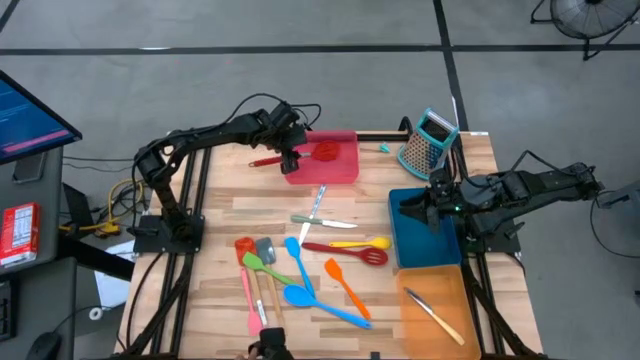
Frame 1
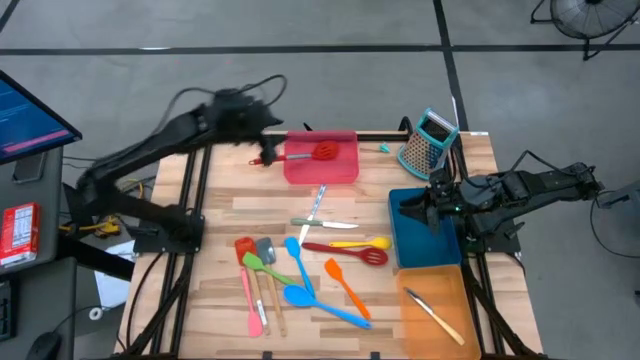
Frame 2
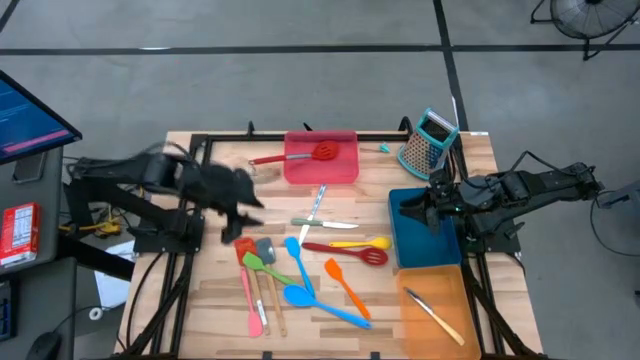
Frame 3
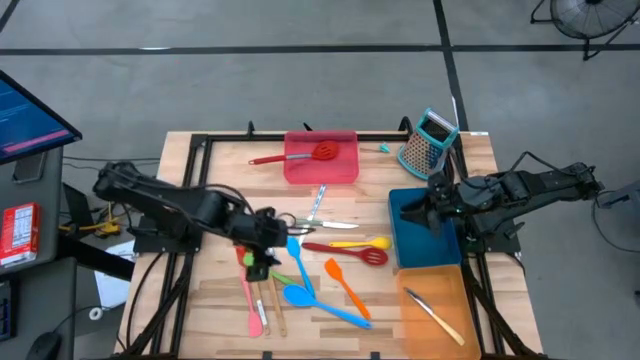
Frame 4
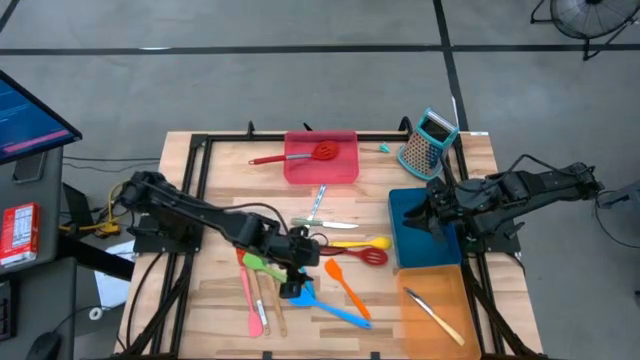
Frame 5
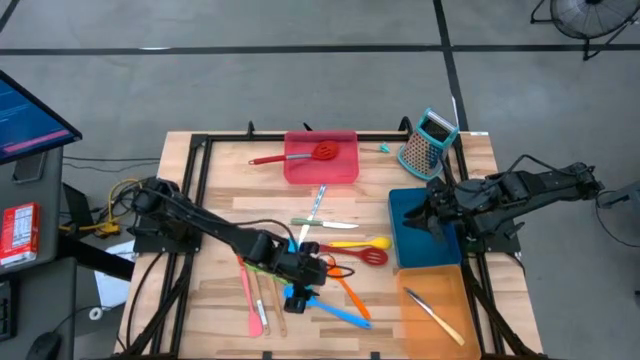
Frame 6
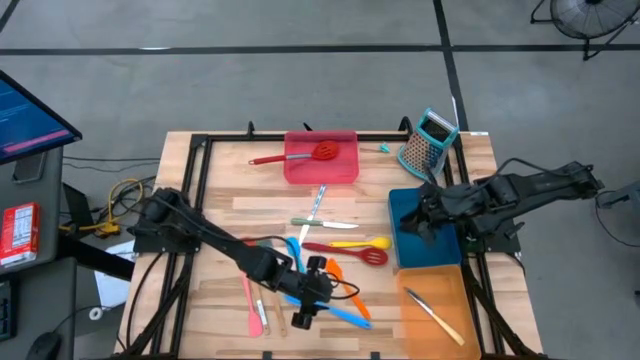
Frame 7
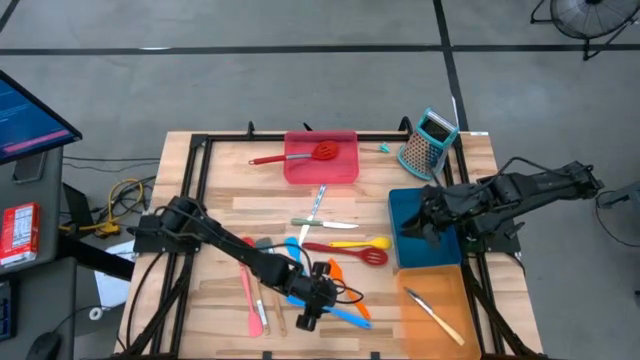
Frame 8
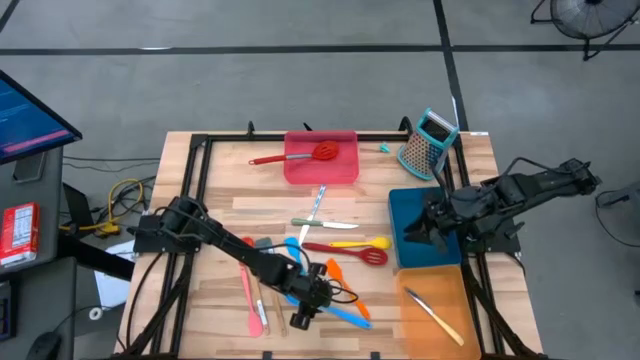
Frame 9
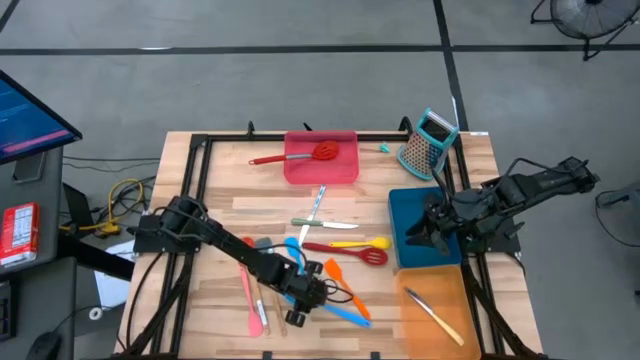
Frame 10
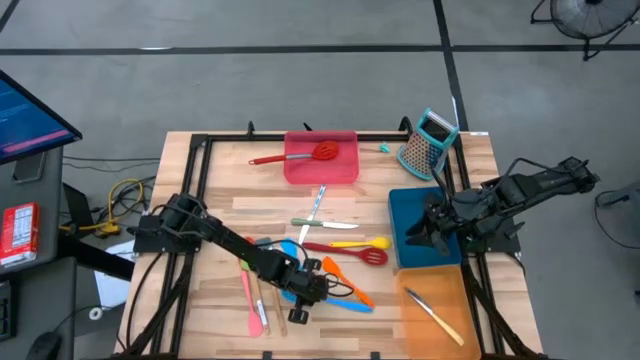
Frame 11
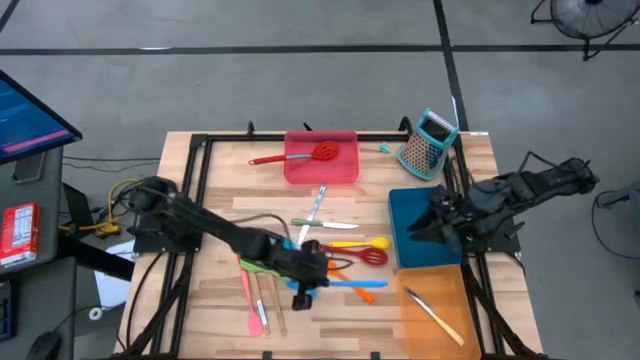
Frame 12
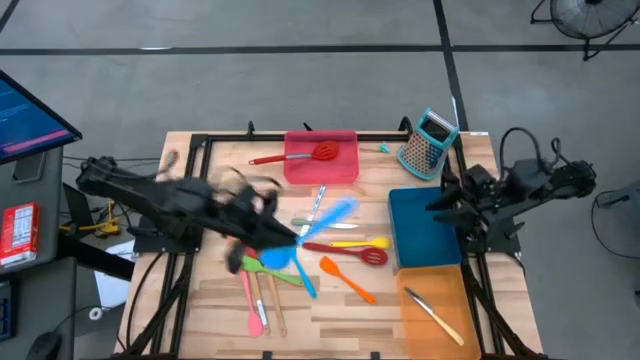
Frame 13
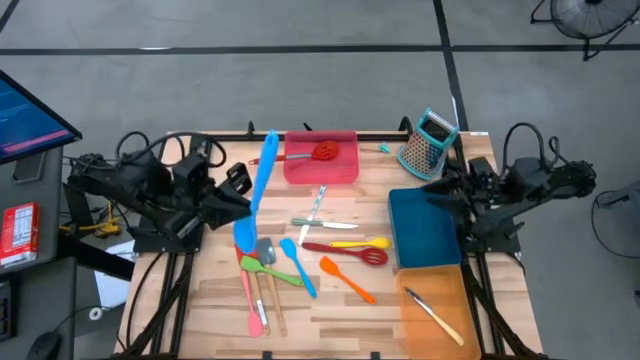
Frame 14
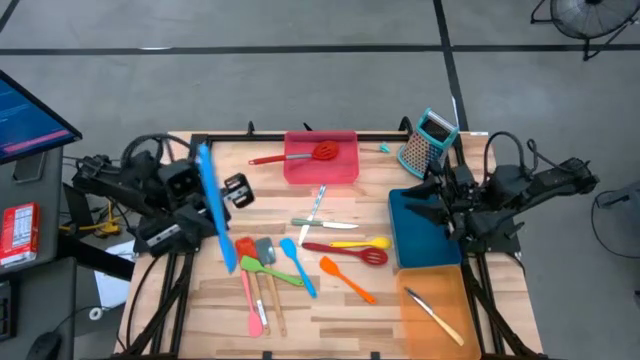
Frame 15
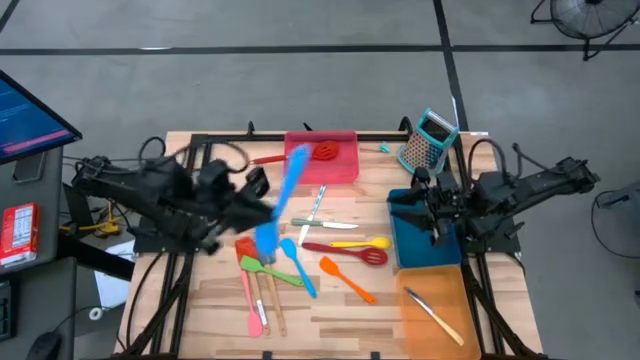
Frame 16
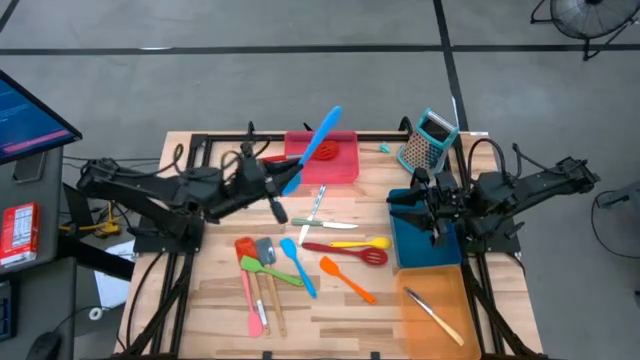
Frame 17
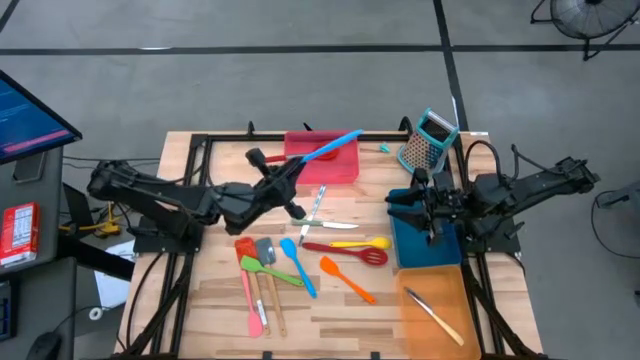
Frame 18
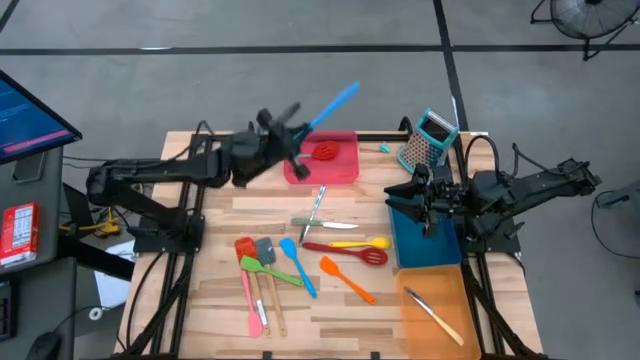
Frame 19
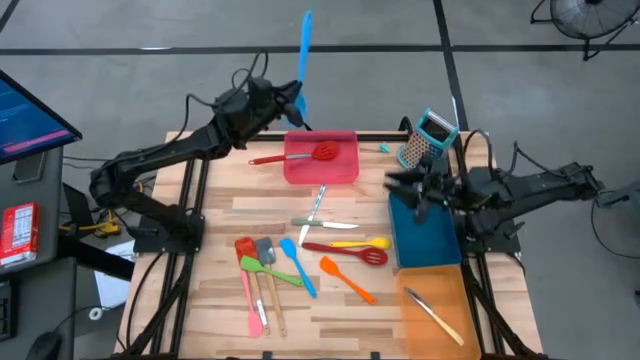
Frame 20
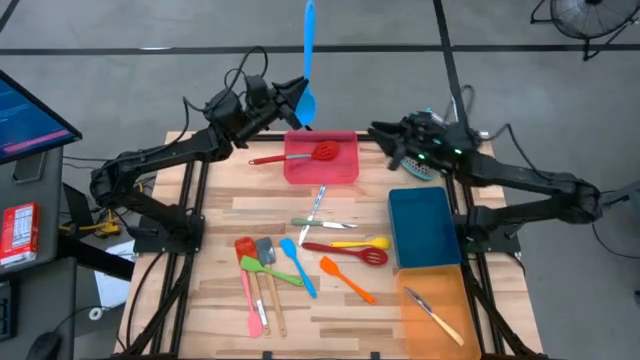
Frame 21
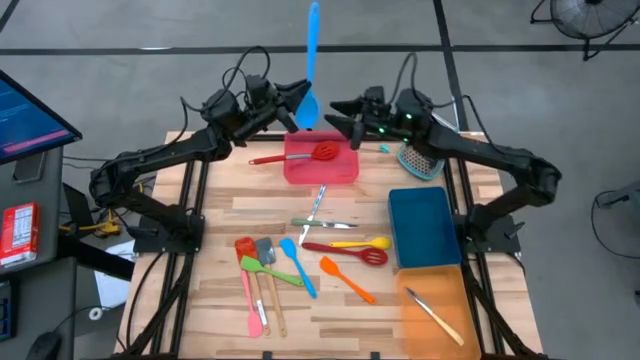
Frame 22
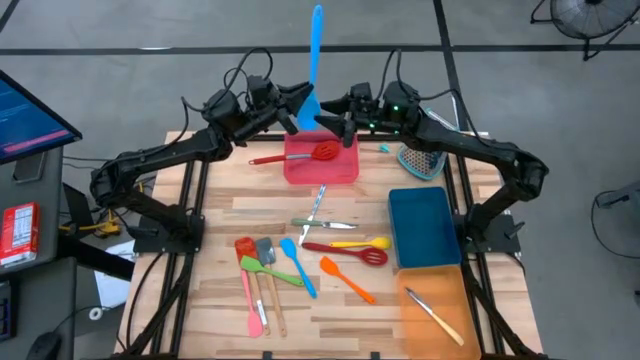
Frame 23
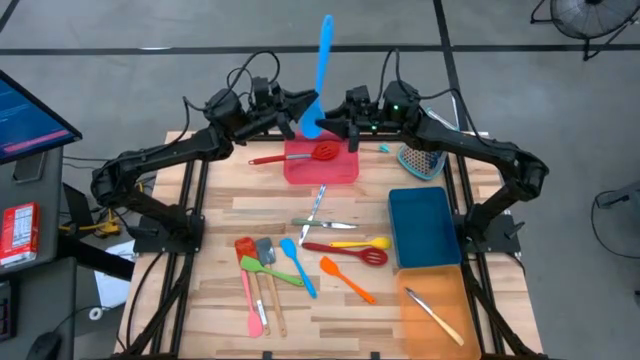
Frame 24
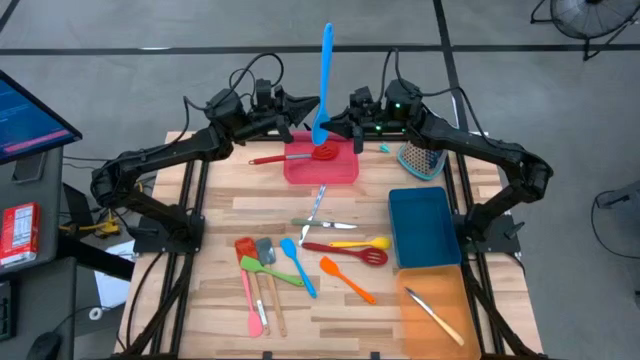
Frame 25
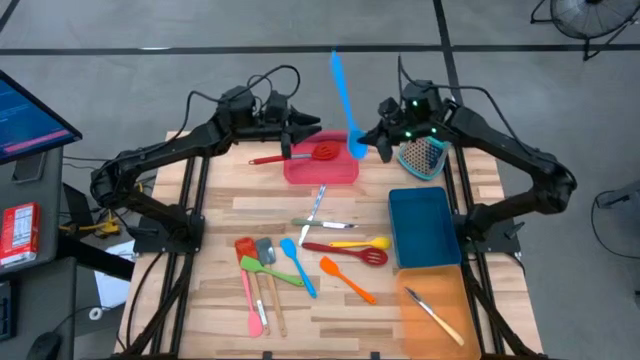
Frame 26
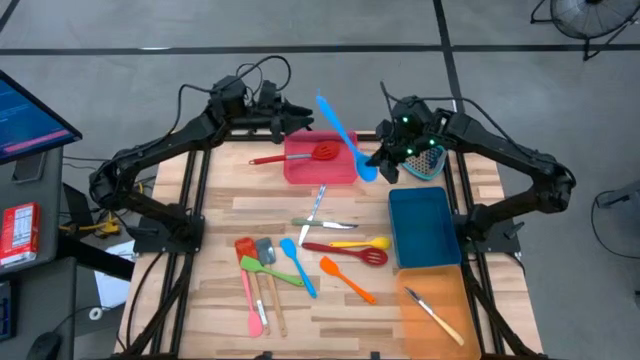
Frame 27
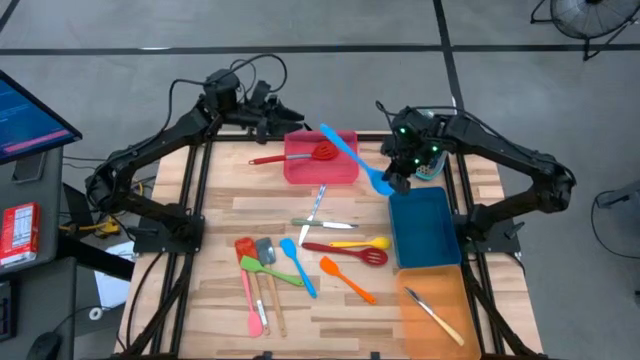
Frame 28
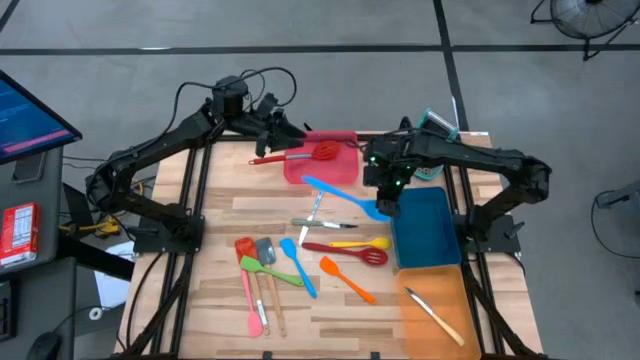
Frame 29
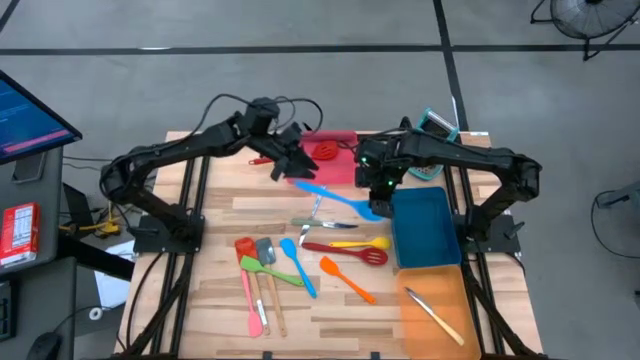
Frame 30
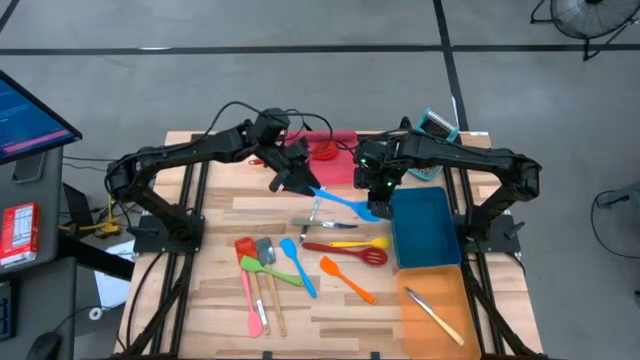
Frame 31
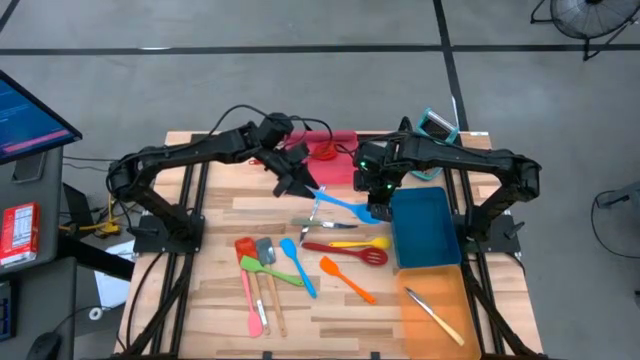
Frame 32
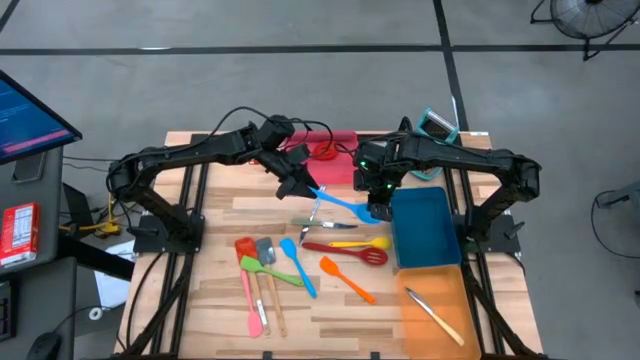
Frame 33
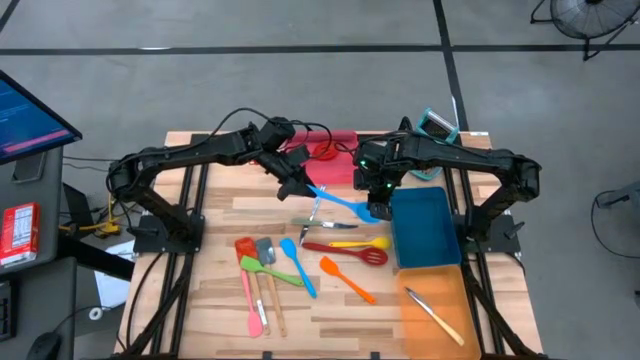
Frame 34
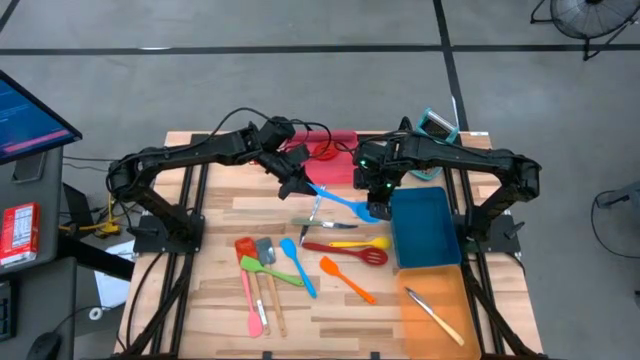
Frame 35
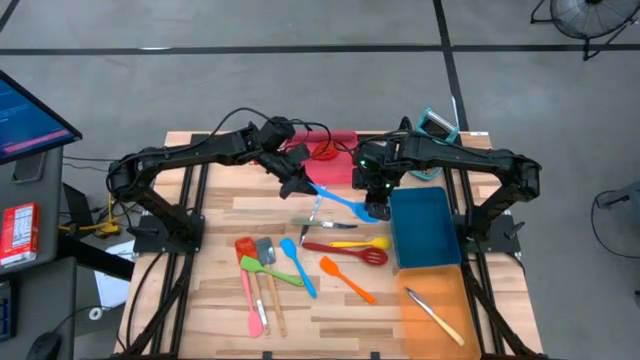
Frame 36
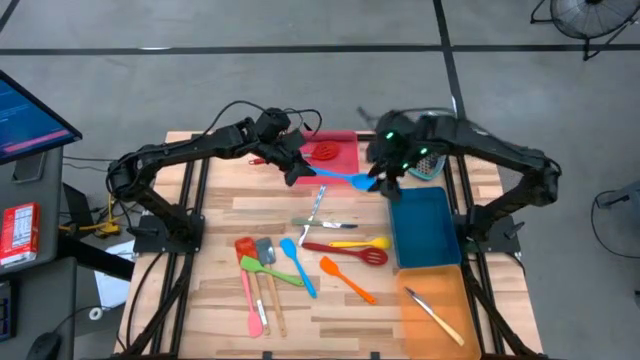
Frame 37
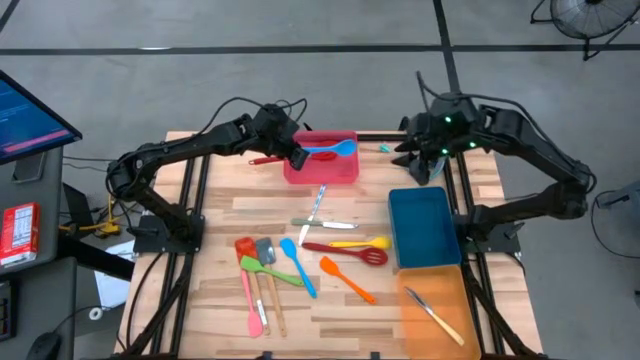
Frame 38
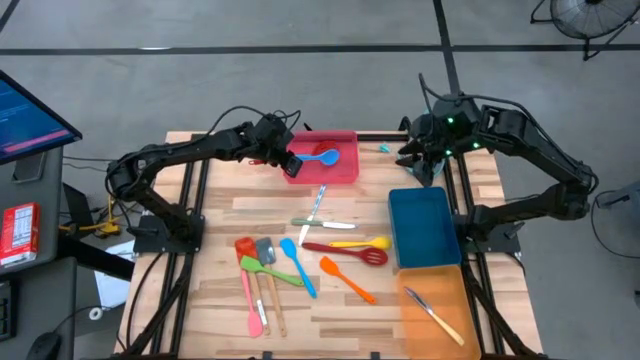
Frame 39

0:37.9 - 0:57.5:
Task: Pick & Place Kitchen Items
Put the blue serving spoon into the red bin
